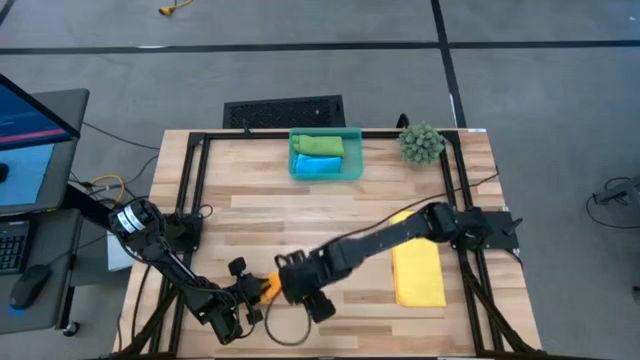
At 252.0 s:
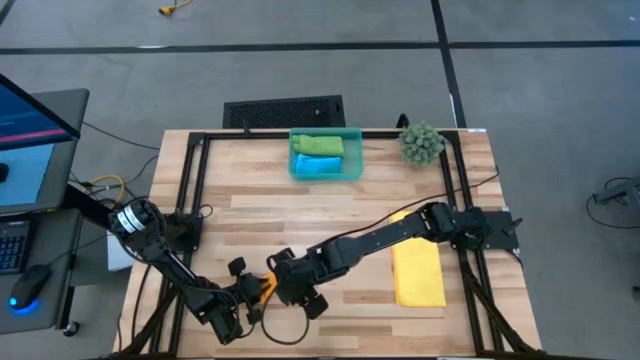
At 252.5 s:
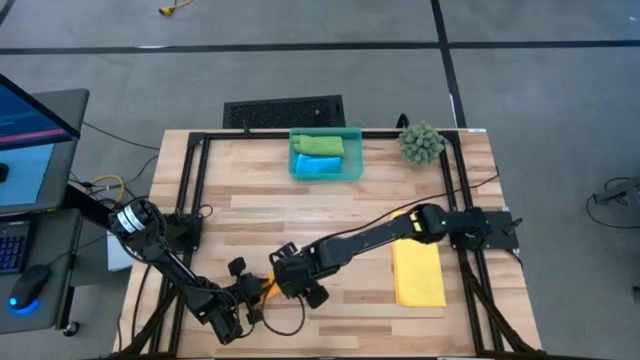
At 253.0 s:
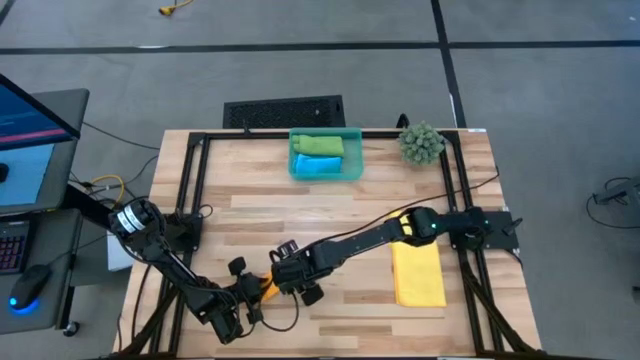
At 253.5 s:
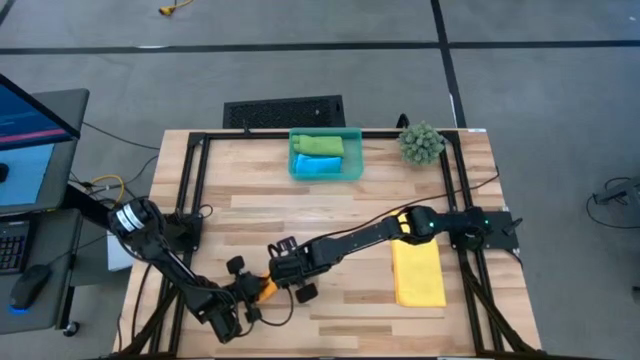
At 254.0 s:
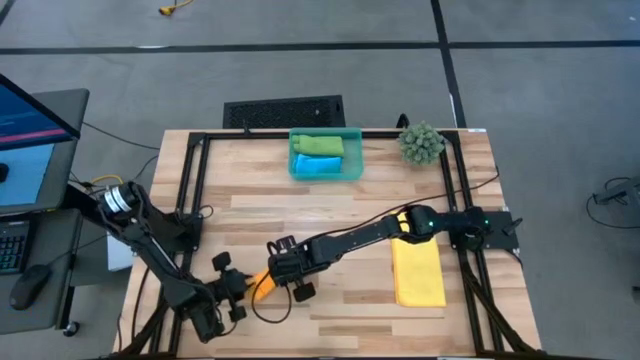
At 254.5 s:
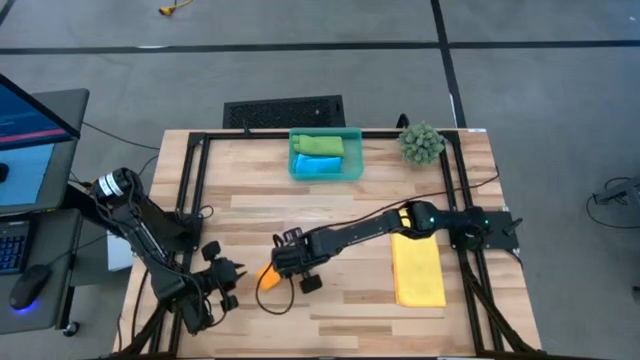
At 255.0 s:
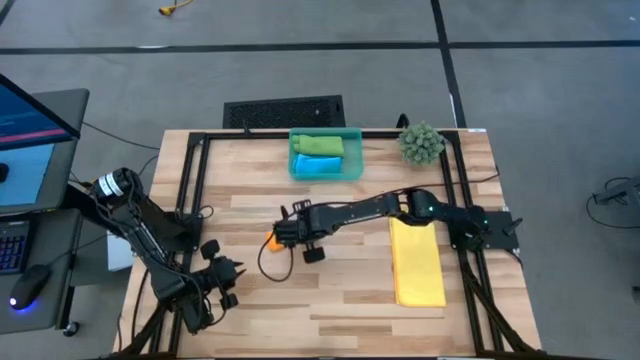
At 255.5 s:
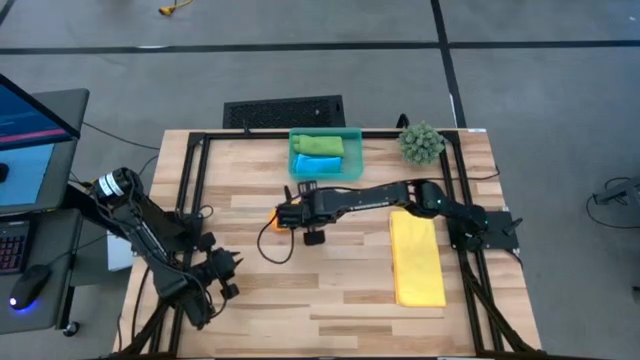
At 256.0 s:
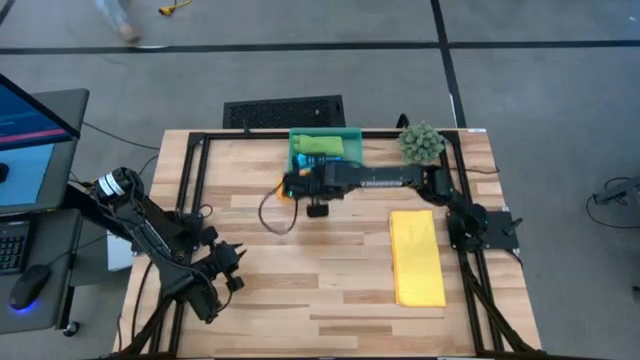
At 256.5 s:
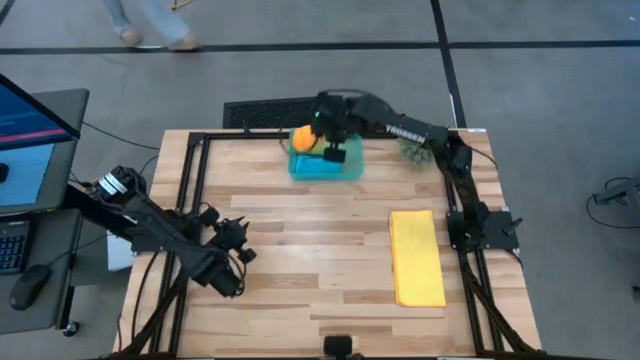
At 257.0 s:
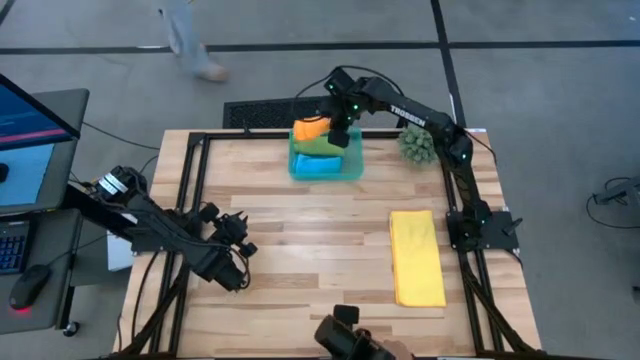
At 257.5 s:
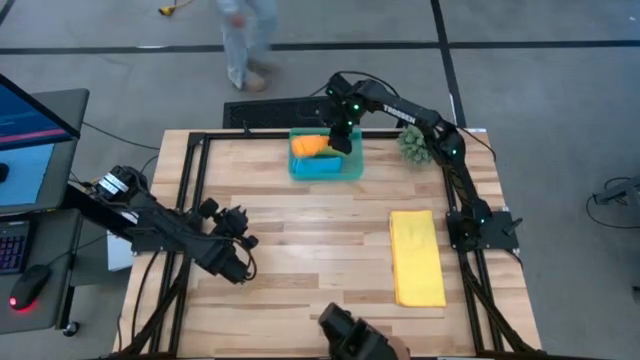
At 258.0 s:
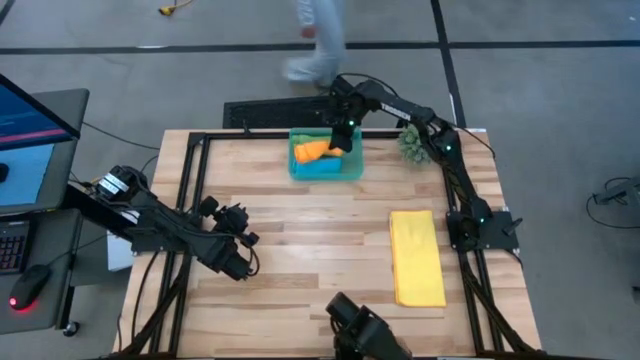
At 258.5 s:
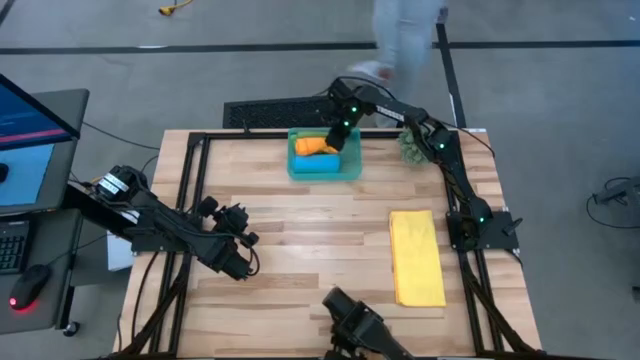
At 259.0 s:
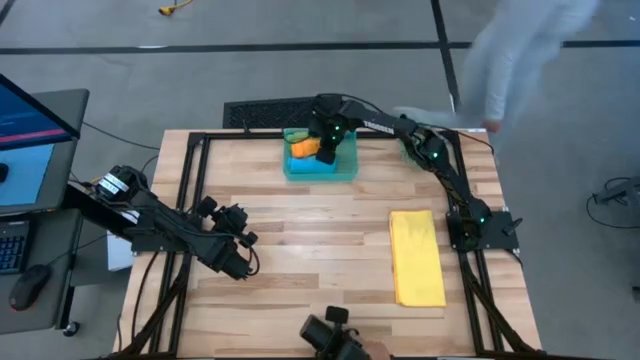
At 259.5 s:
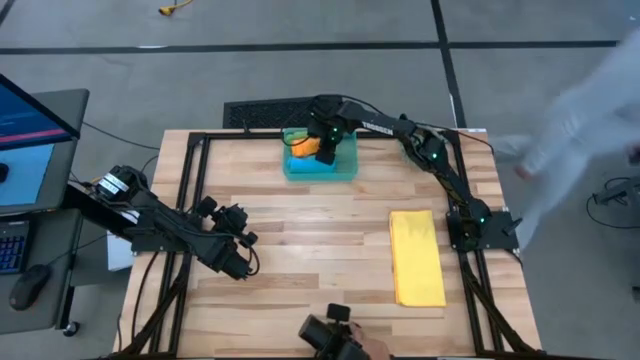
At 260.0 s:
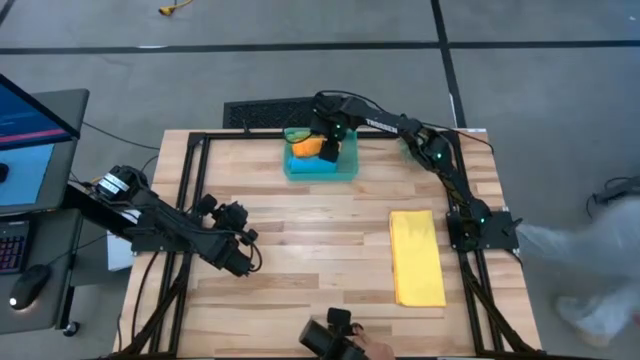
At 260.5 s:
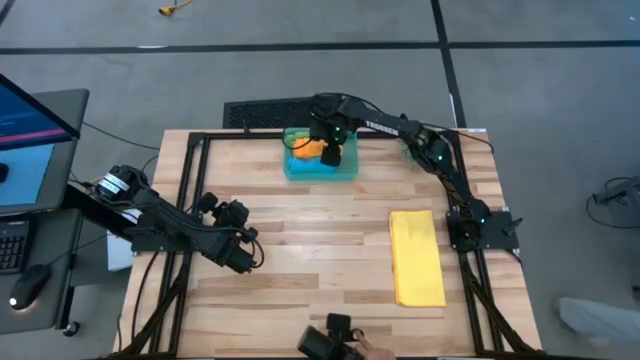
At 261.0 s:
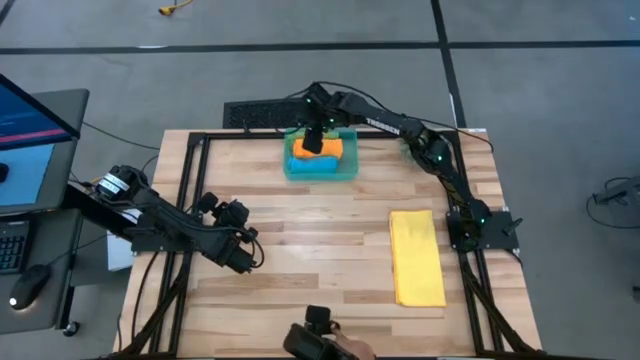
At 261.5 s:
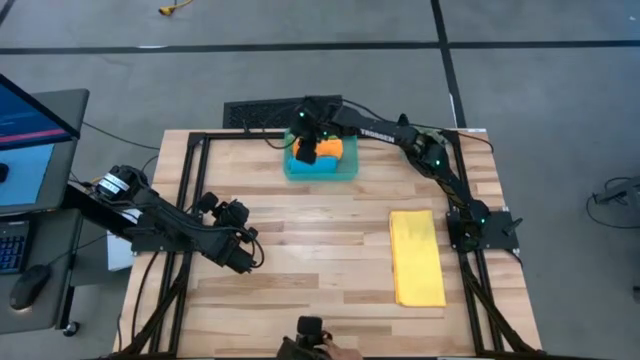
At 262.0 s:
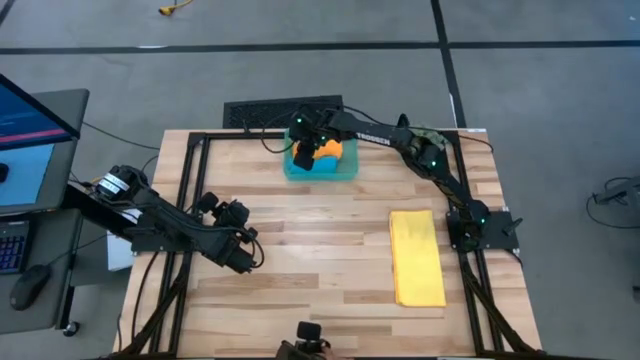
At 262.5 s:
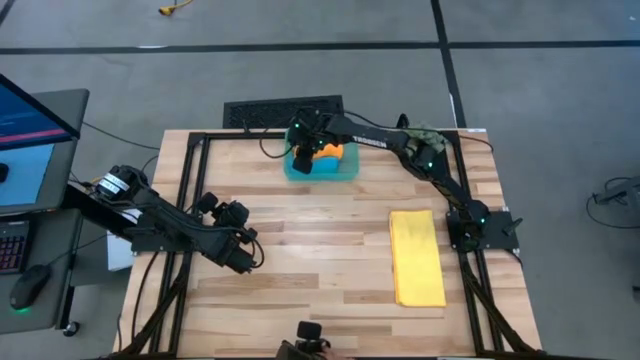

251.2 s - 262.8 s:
Task: Roll microfiber towels into tight, uniform cylinder then place into a basket
Put the rolled orange towel into the green bin

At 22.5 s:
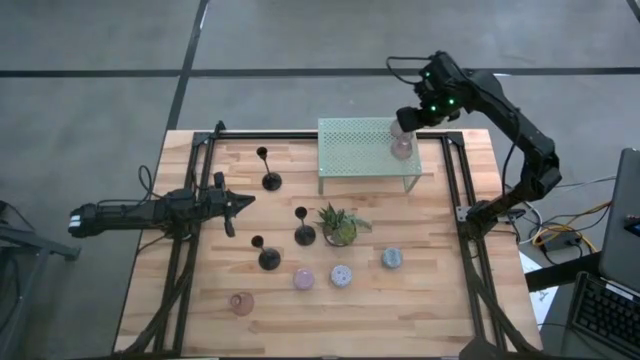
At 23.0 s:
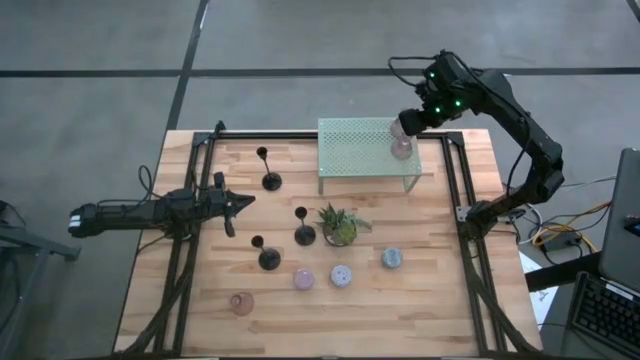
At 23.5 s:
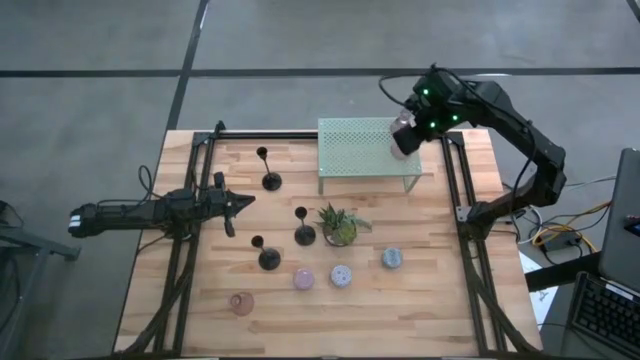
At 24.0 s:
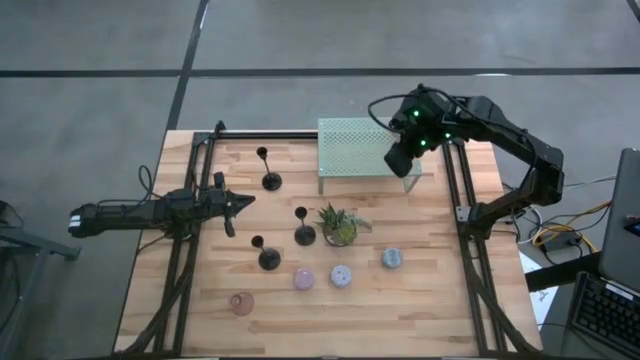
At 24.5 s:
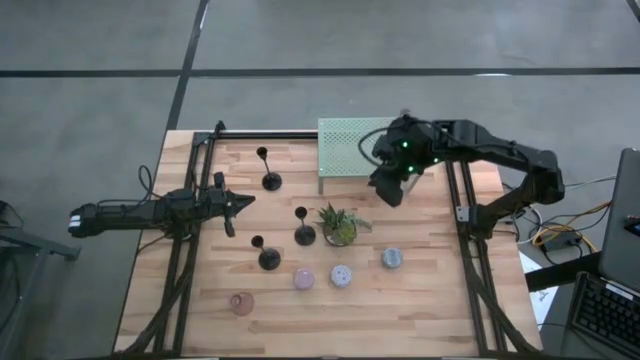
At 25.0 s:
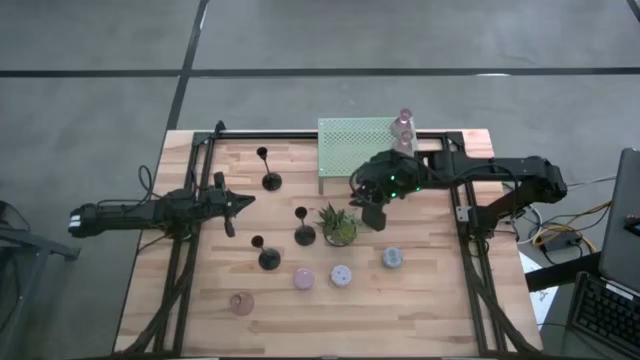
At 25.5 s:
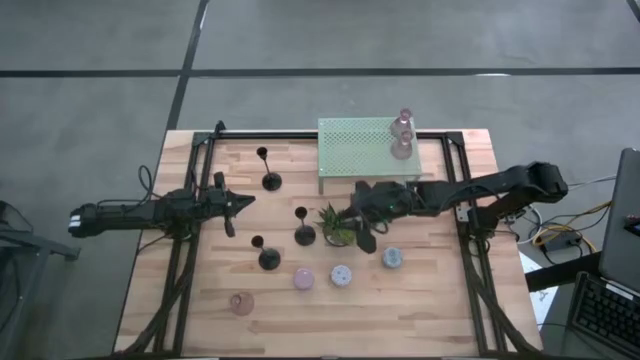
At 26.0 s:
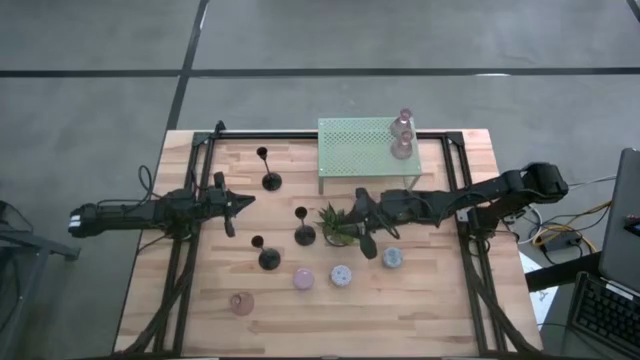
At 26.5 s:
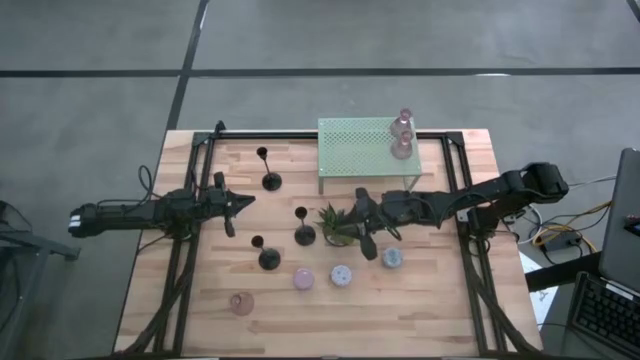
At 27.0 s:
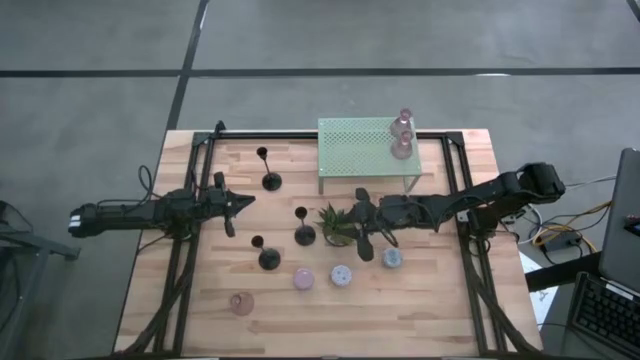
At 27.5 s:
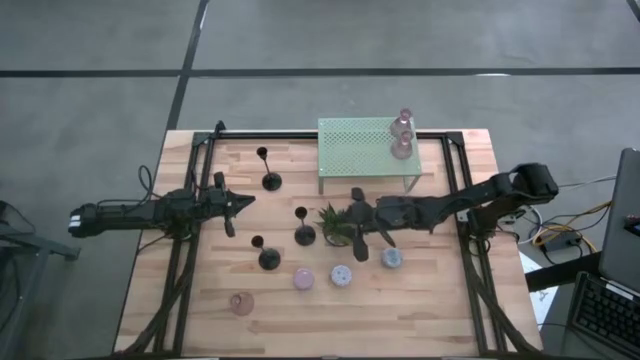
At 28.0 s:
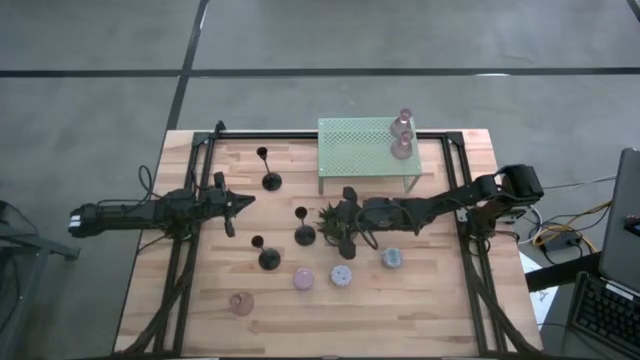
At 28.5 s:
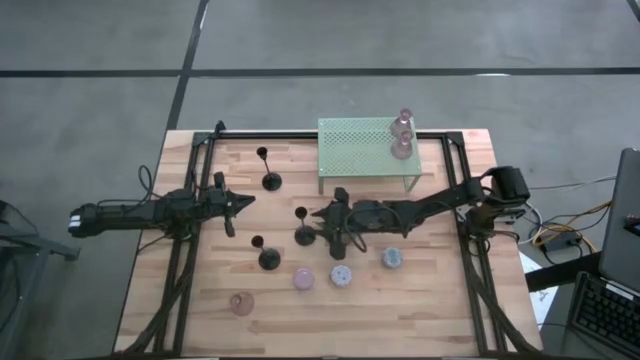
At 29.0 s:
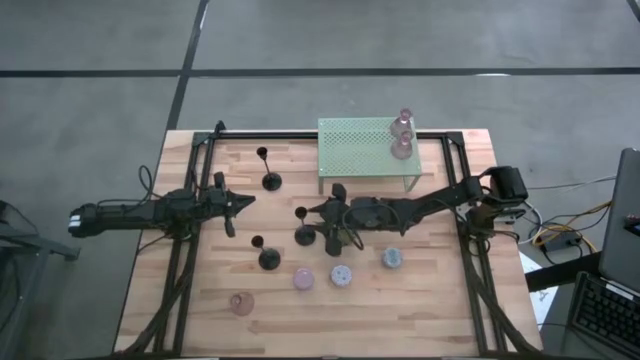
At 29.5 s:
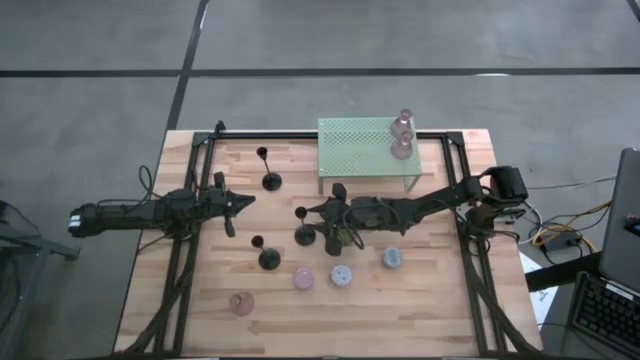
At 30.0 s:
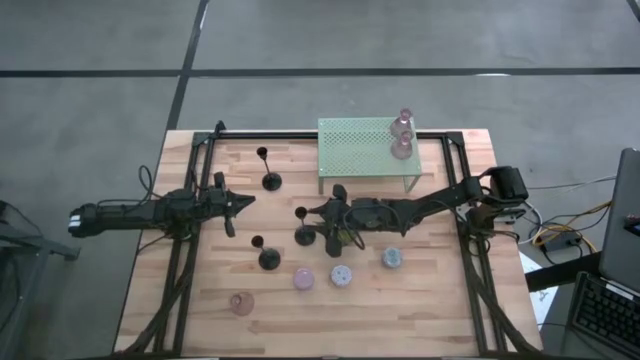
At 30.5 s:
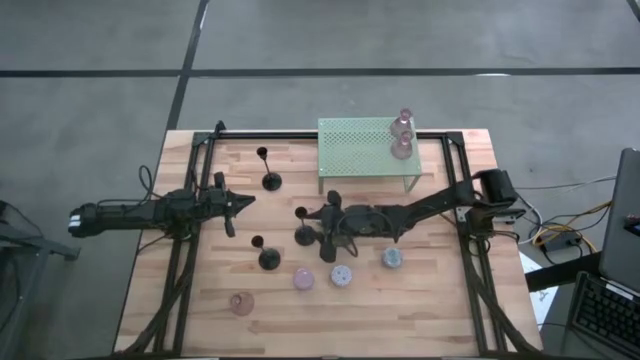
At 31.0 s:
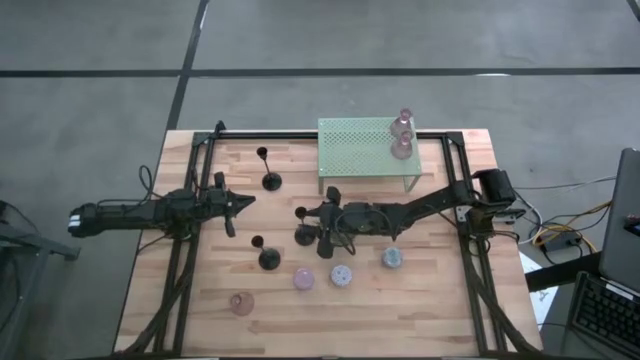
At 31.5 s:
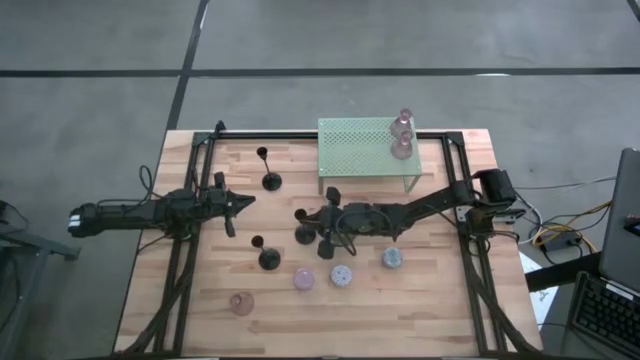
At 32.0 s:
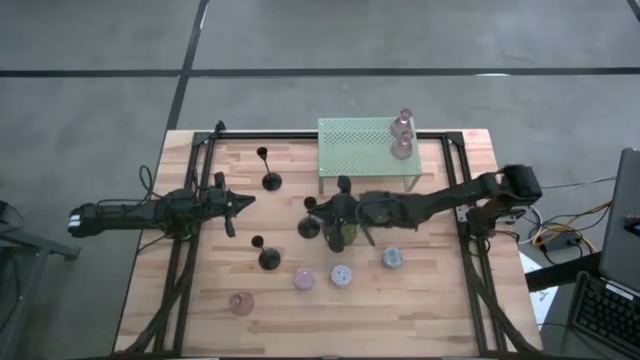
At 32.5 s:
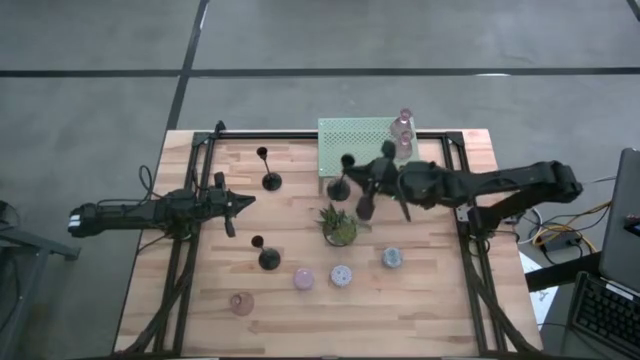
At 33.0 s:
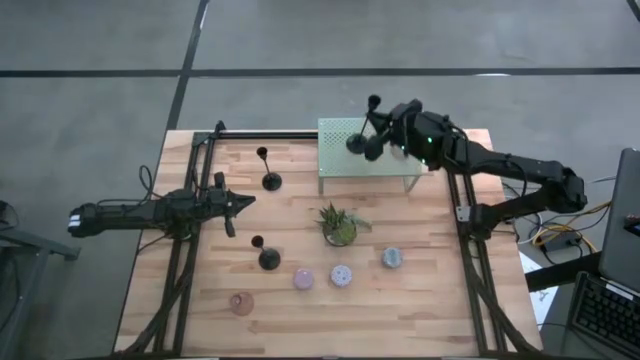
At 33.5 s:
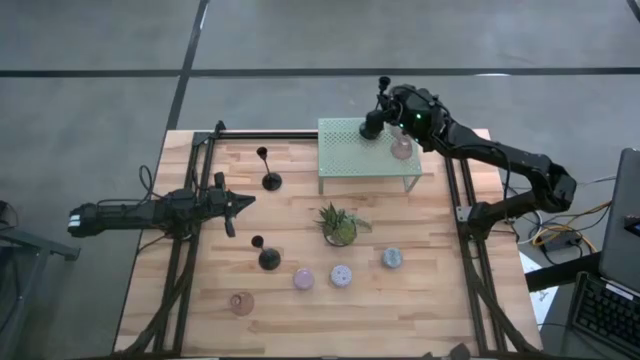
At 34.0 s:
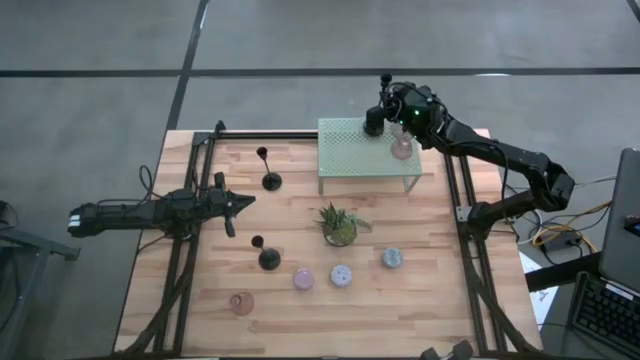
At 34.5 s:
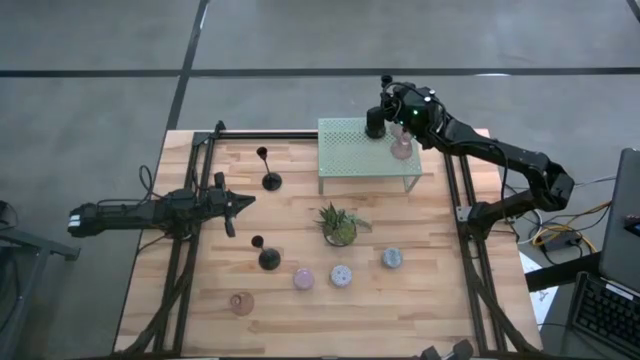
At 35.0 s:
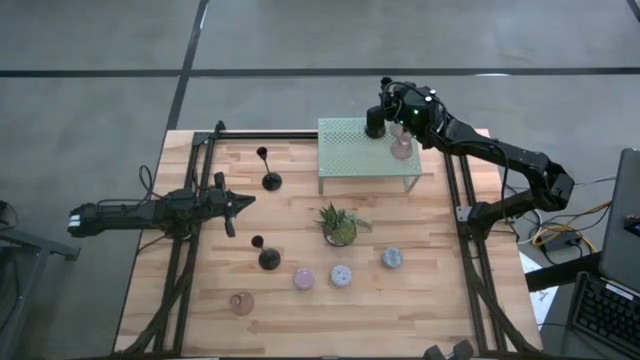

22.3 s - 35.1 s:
Task: Pick & Place candle stick holders
Put the bottom right black candle holder on the shelf
